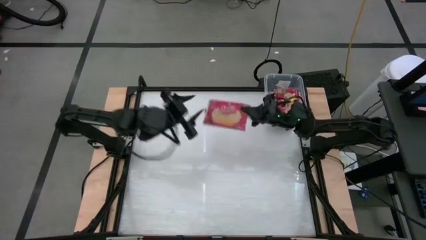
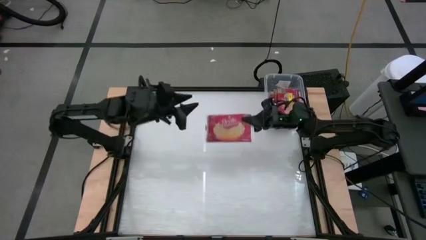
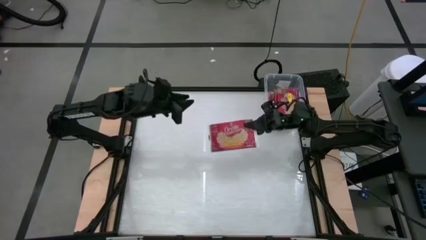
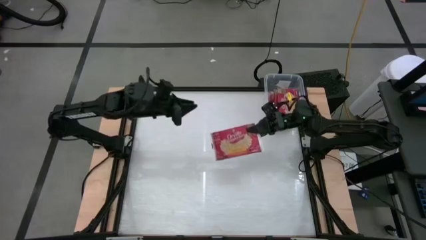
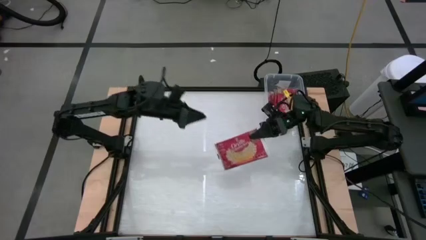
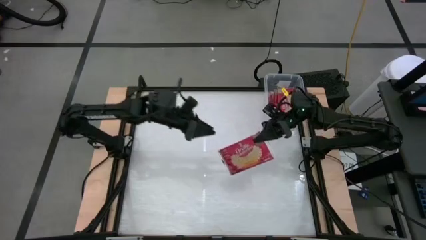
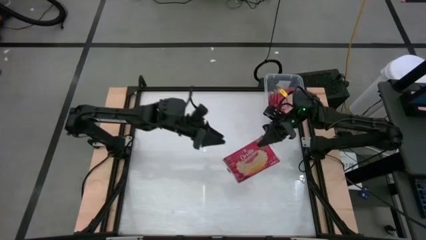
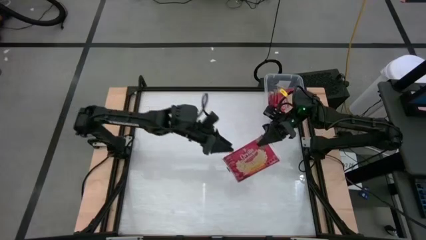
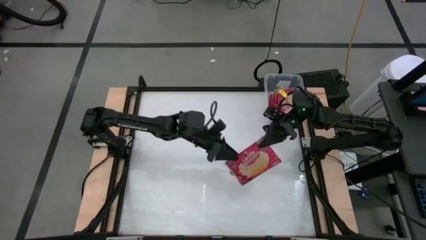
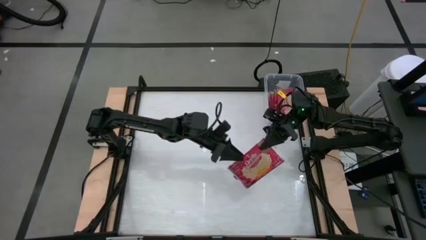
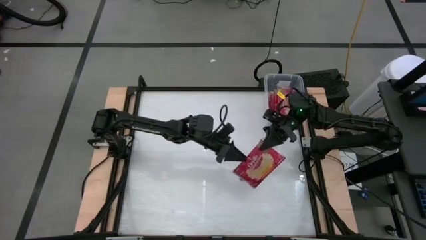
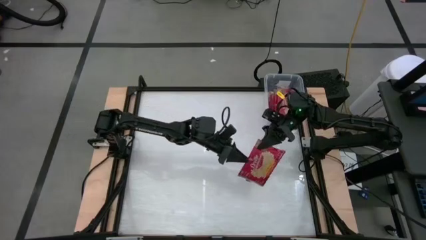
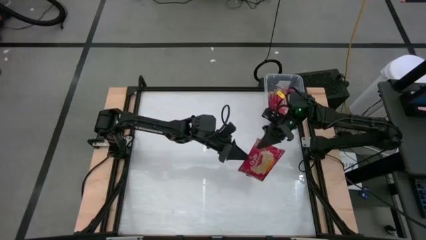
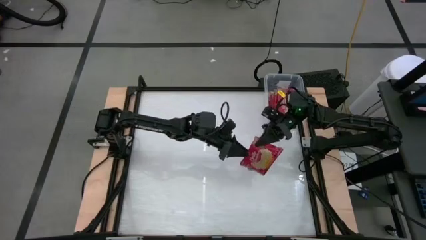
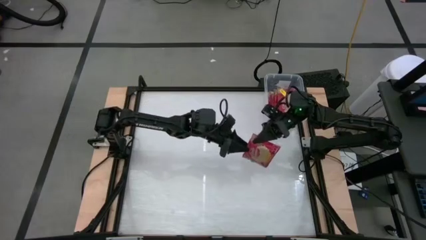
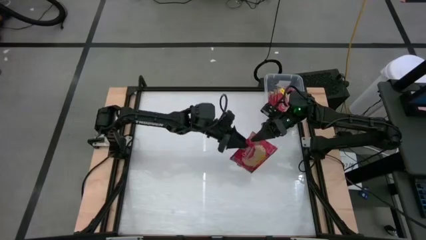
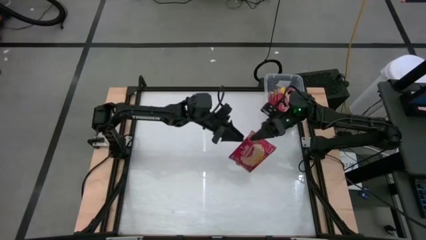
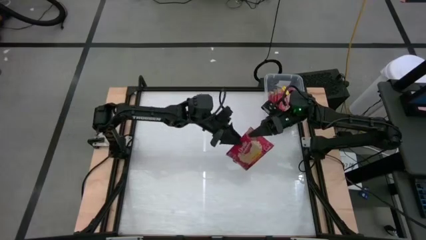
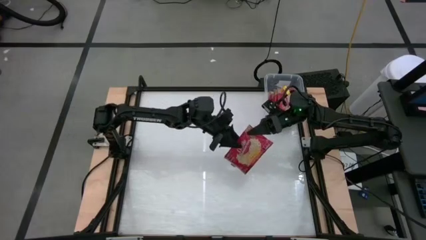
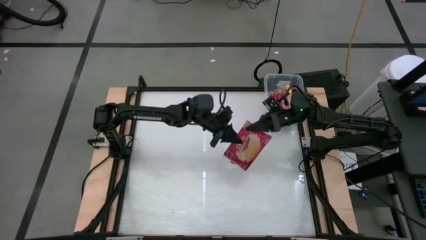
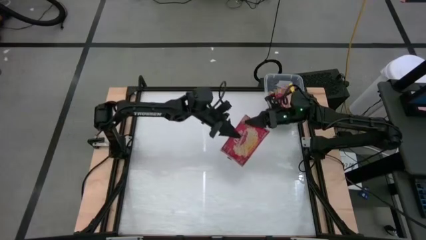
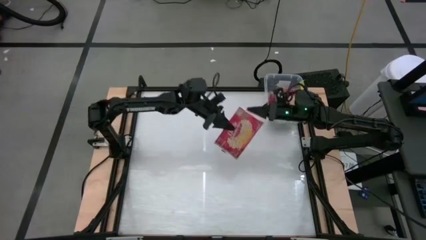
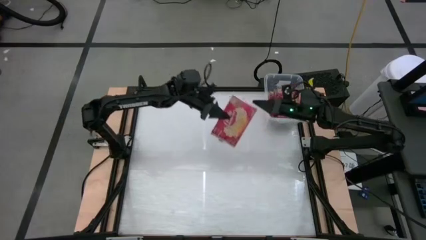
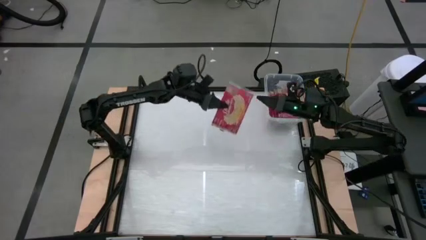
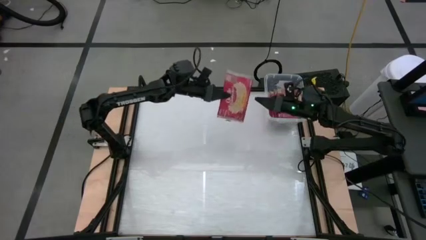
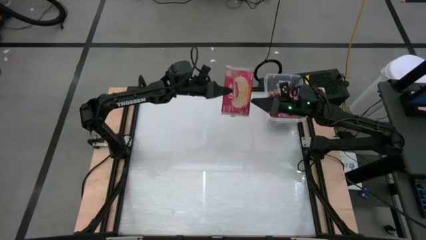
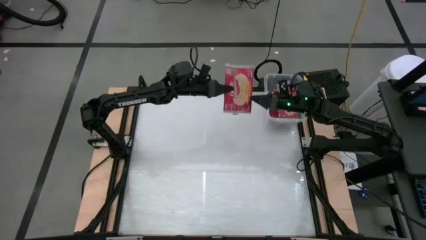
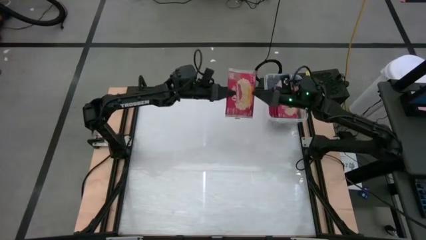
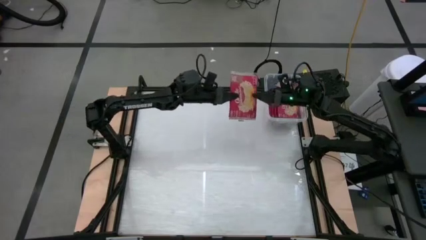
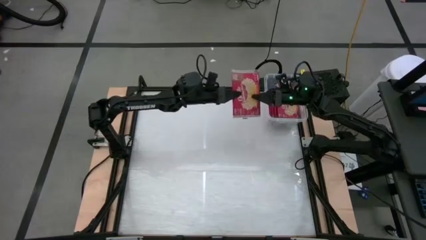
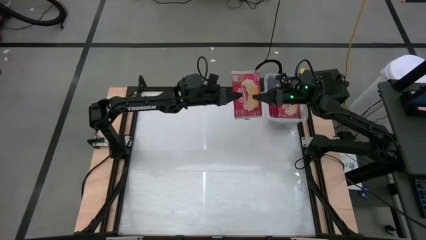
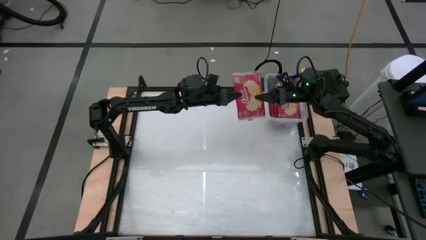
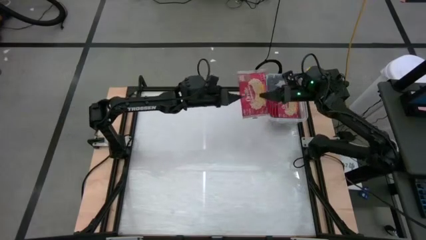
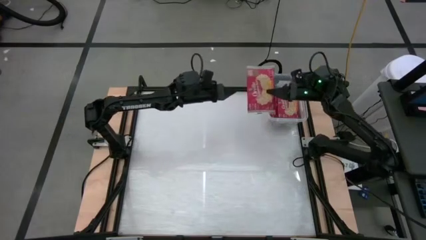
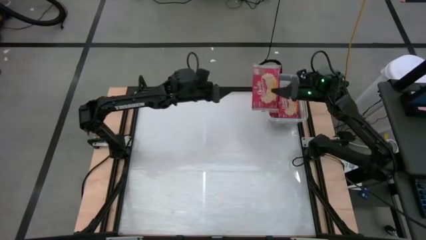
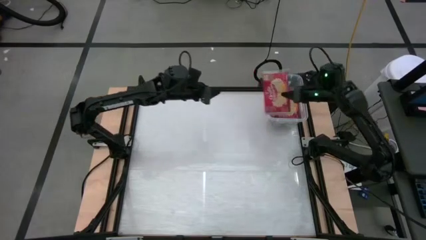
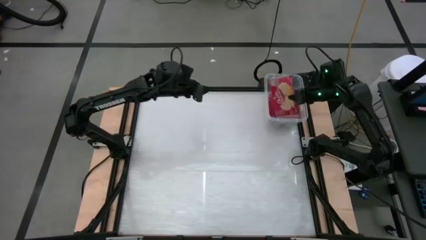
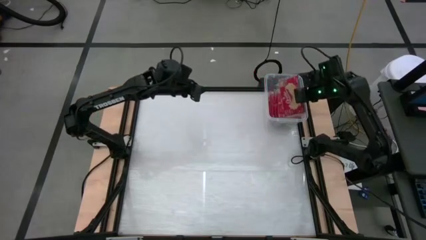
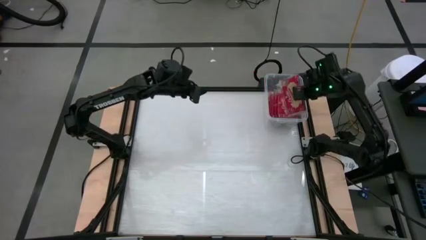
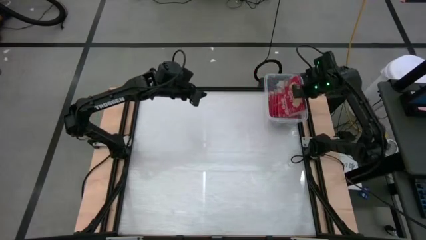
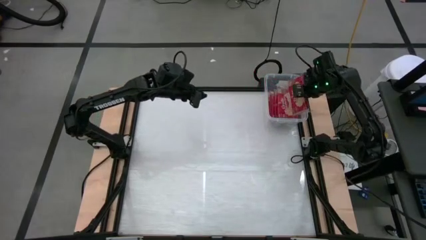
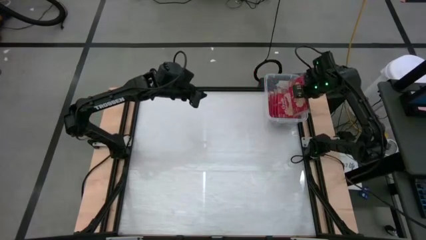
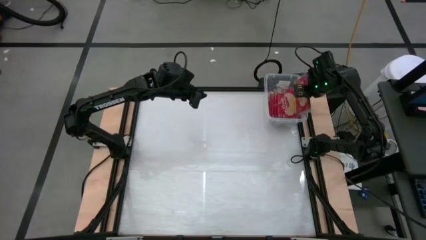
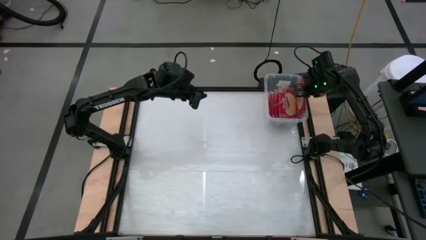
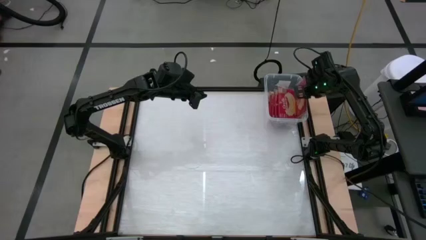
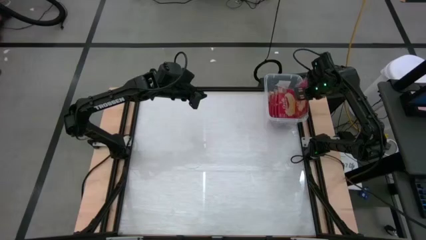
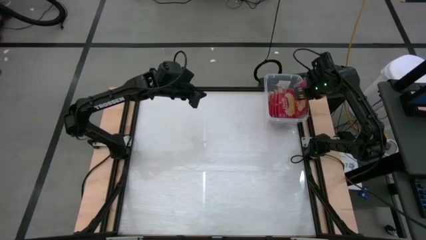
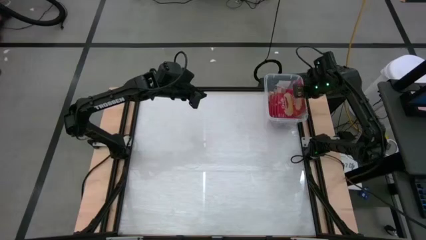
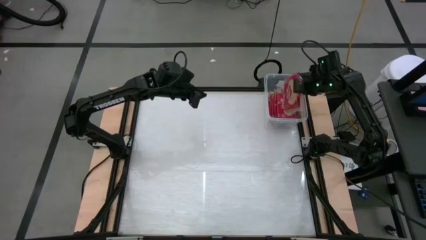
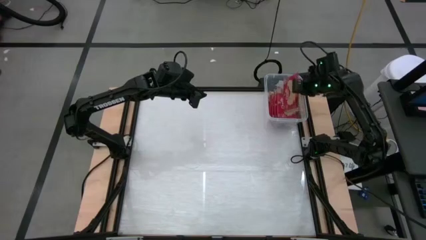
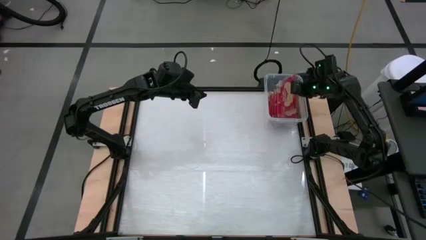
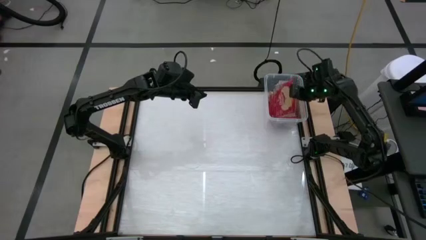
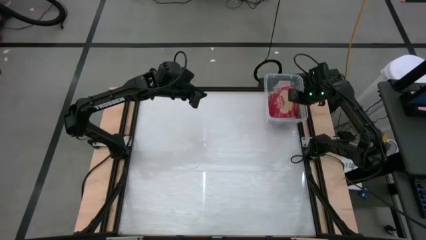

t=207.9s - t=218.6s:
Task: Sort popcorn bags into baskets
Put the red popcorn bag into the transparent container

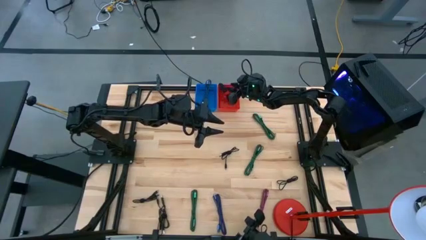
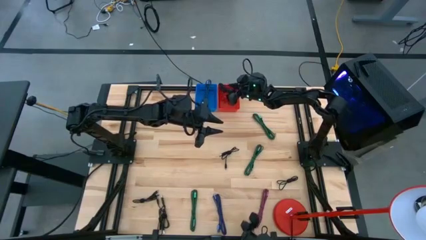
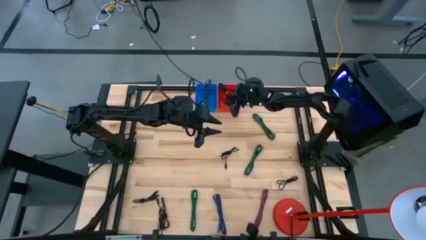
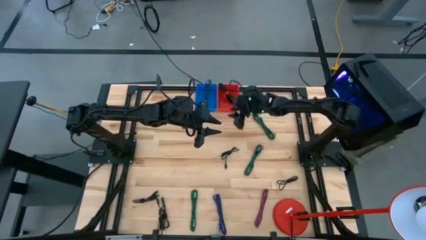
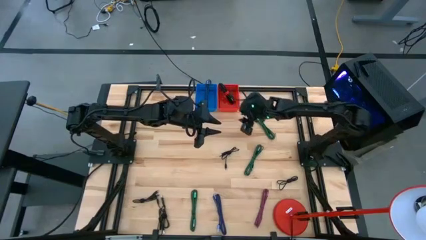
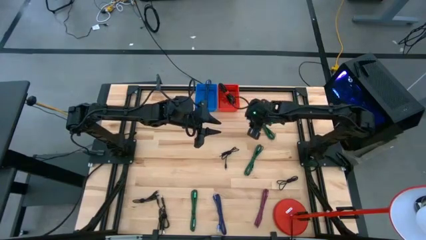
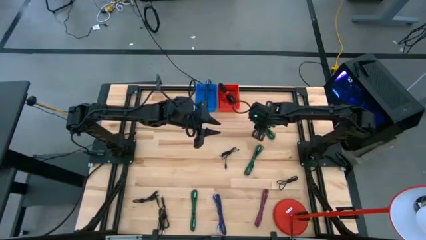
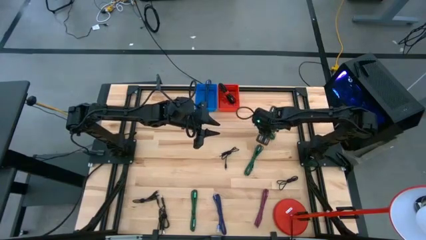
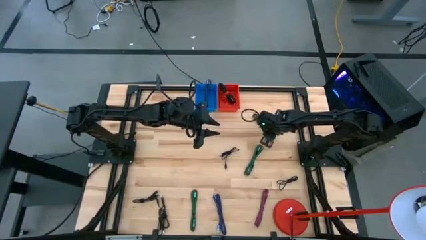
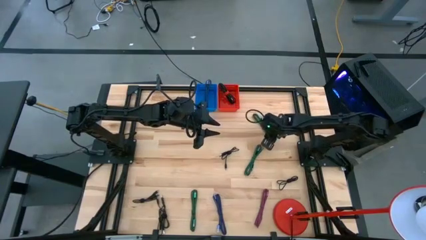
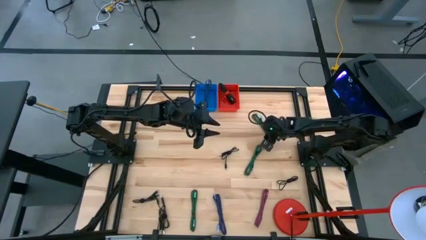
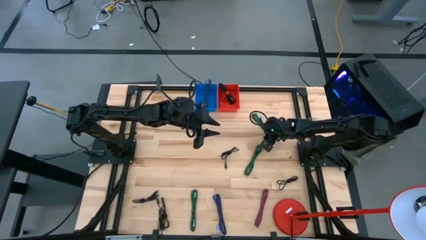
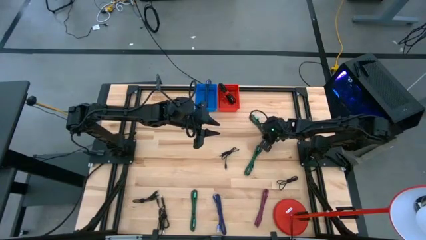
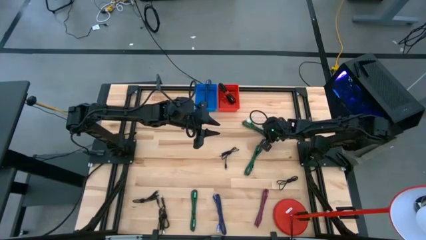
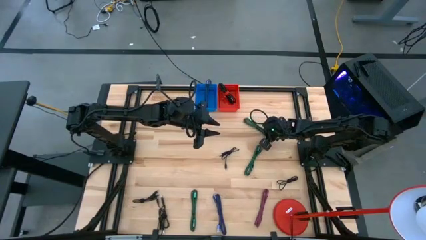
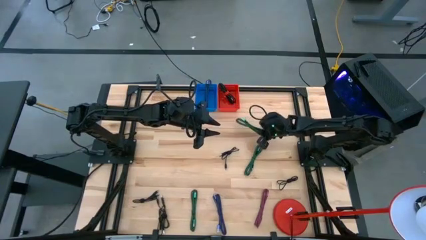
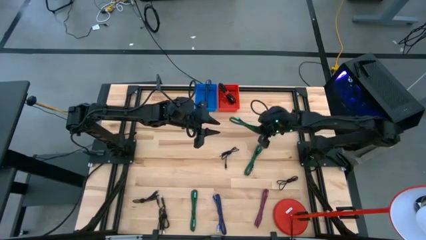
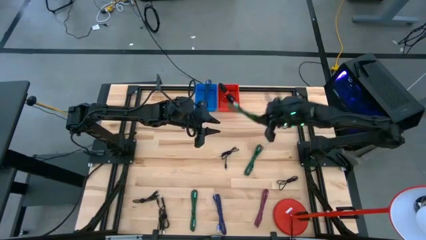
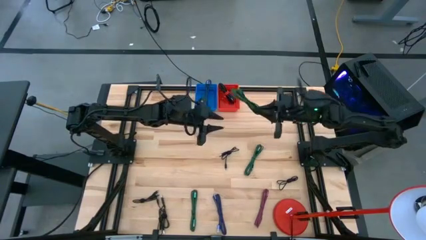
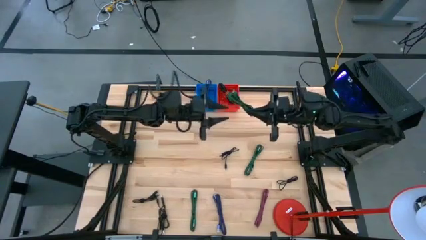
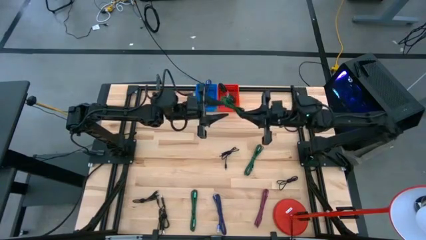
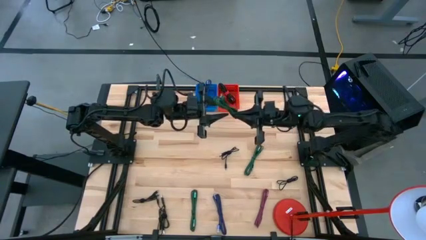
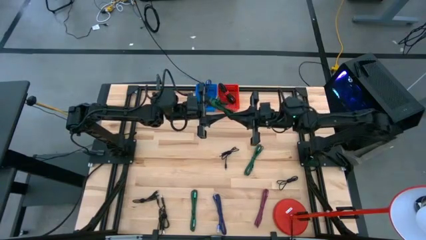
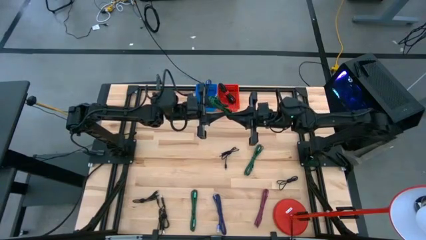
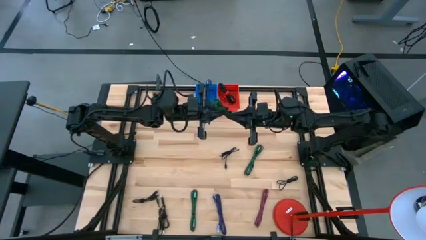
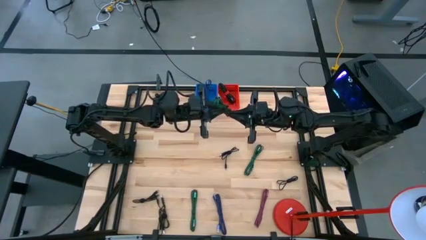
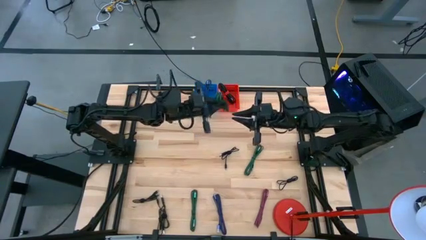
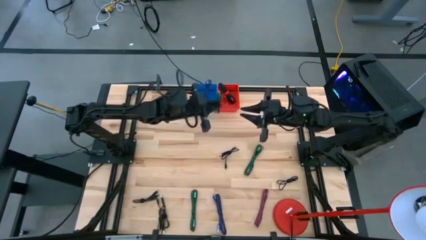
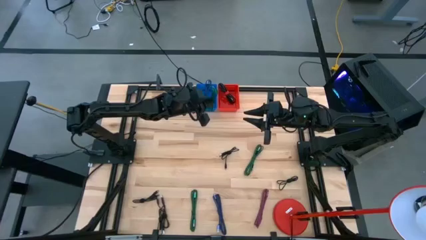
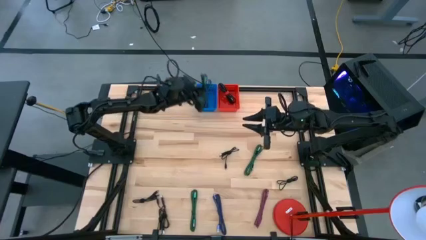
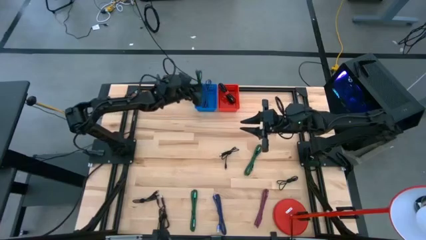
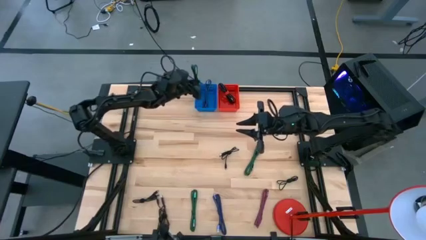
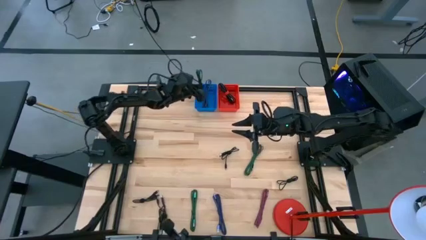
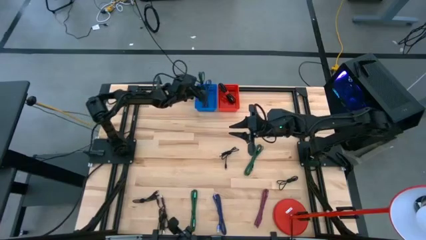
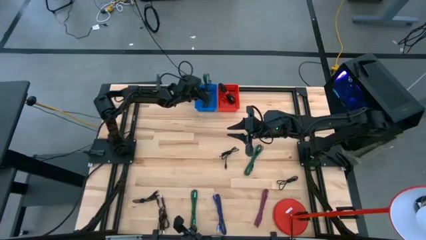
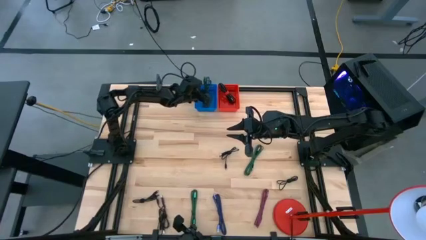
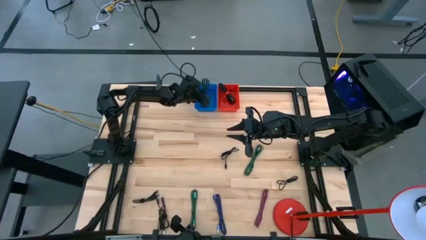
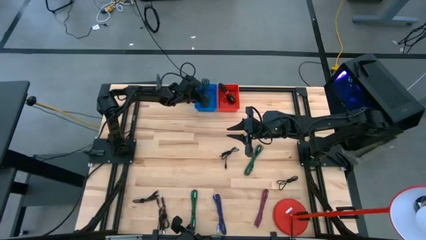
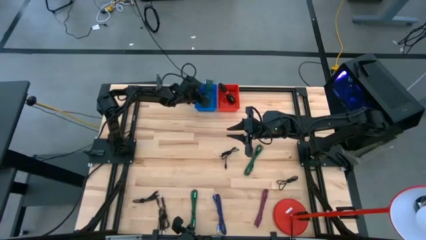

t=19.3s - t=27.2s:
Task: Pick & Place USB Port
Put the green charger cable into the blue bin
